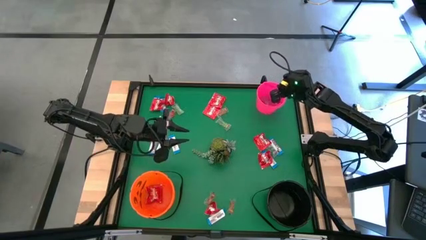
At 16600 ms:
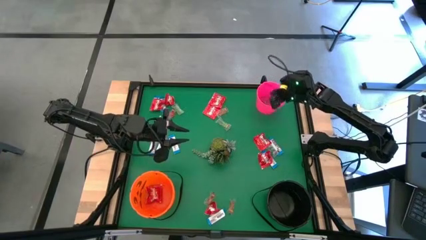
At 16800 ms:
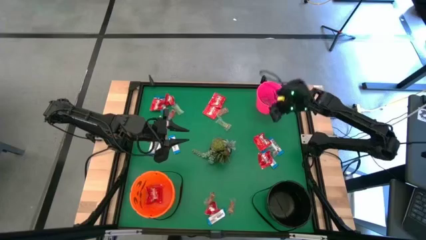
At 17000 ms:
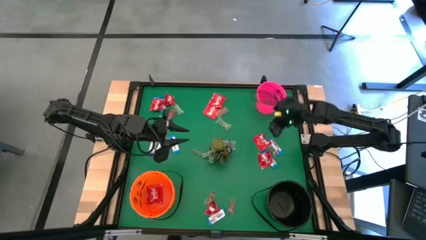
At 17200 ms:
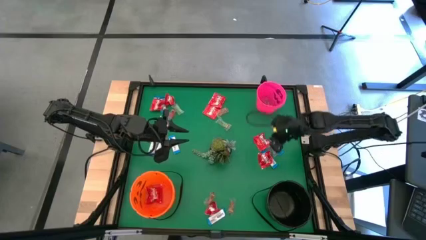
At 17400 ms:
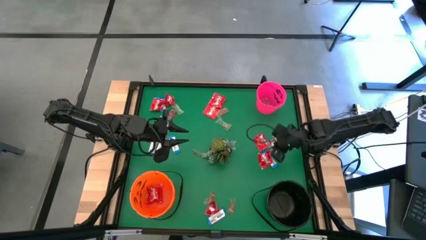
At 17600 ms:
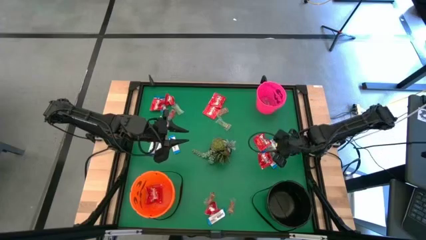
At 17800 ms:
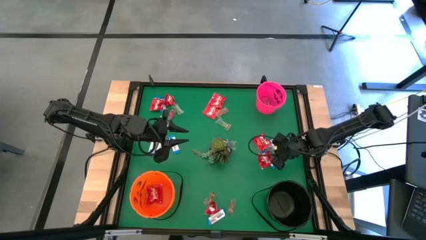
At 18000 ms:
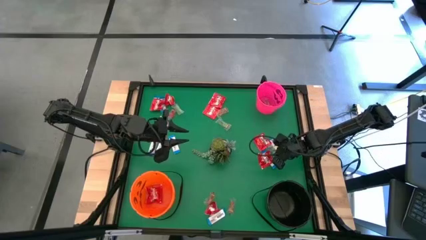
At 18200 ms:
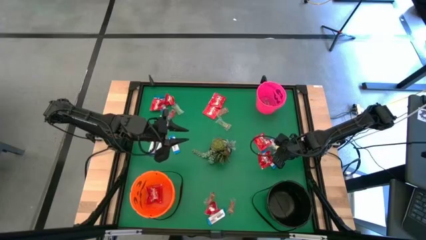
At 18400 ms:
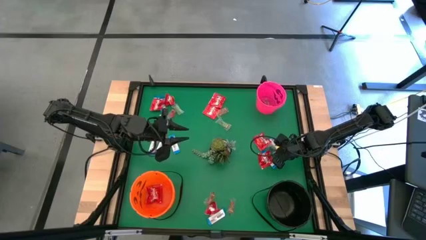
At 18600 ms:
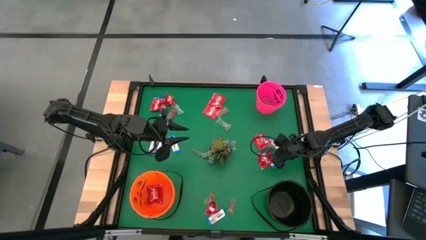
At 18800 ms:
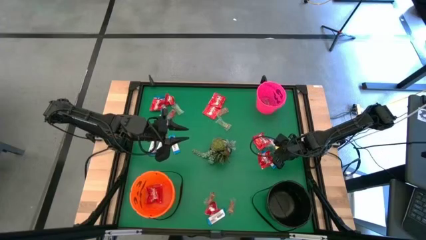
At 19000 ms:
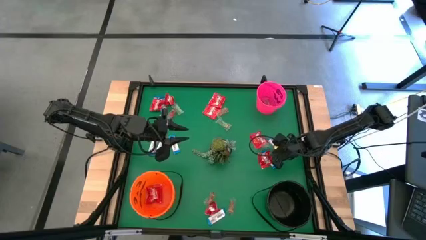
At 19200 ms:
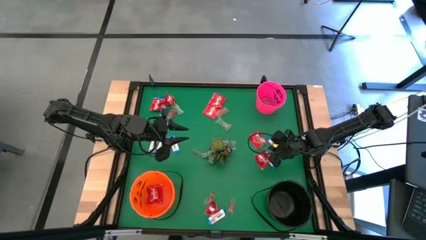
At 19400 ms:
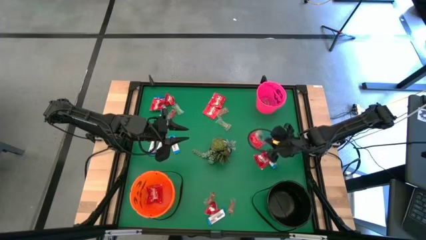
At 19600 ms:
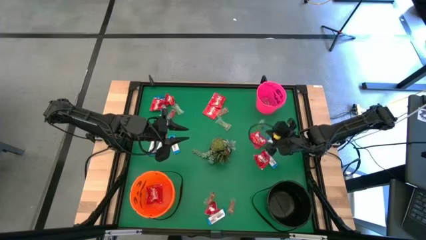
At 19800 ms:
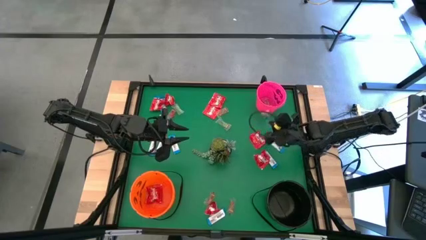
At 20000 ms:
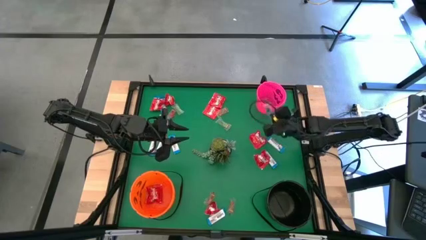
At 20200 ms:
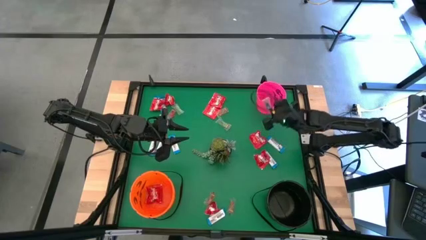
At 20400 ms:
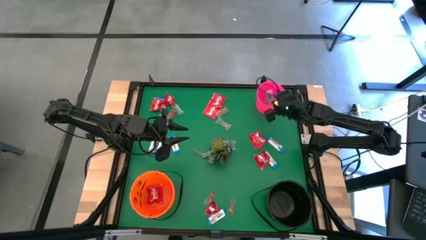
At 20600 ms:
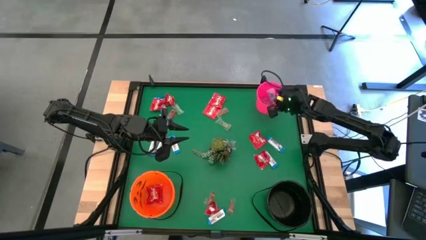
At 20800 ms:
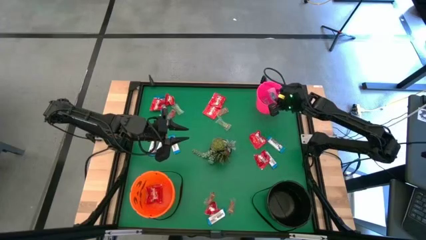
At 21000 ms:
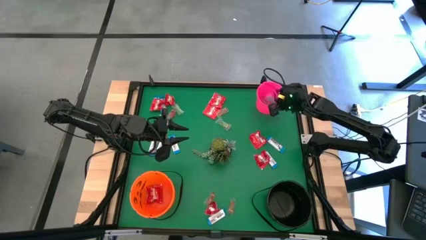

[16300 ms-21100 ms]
Task: Sort candy
Put the blue gummy into the pink bucket

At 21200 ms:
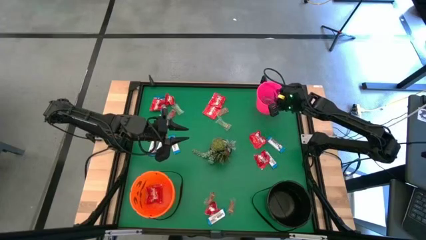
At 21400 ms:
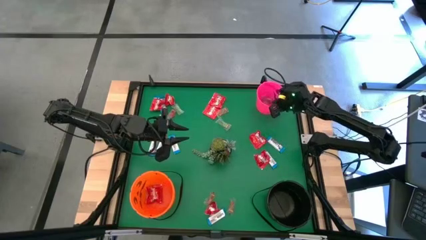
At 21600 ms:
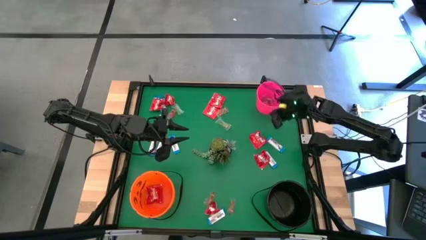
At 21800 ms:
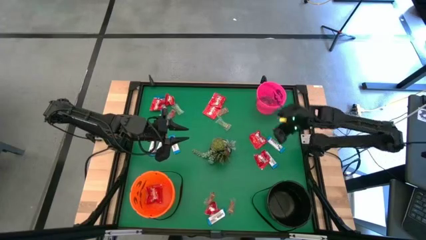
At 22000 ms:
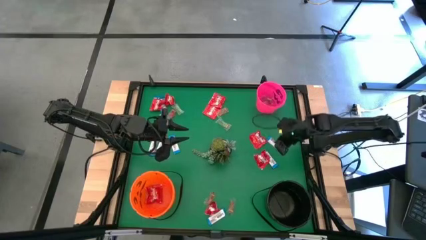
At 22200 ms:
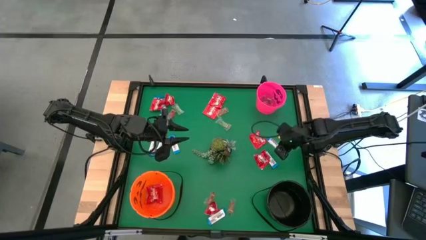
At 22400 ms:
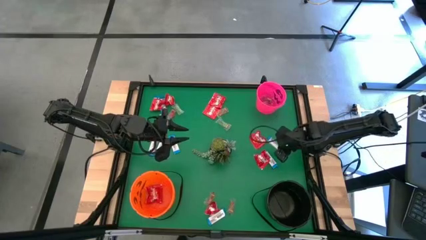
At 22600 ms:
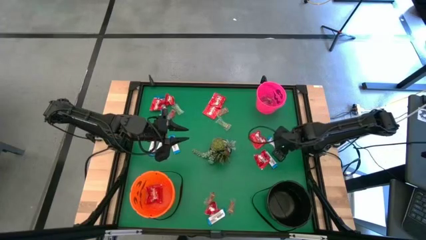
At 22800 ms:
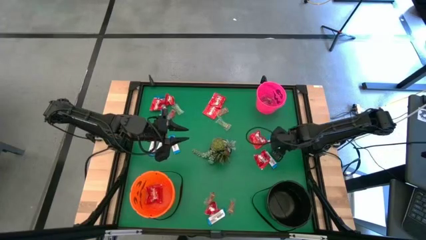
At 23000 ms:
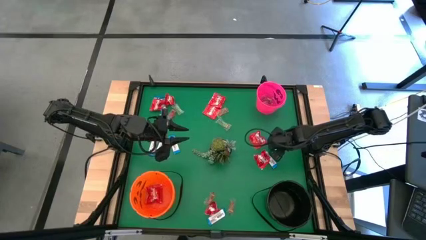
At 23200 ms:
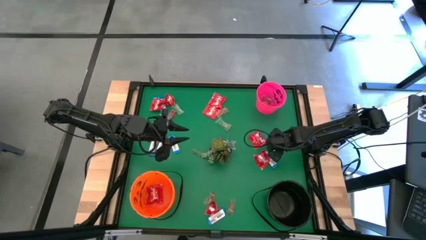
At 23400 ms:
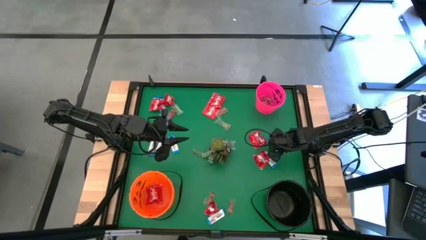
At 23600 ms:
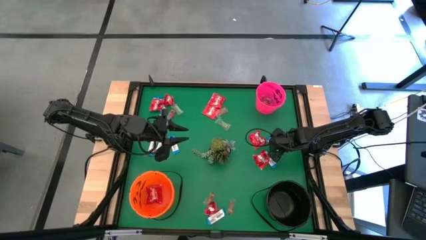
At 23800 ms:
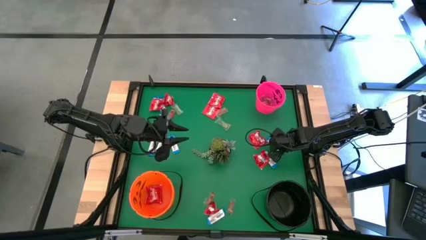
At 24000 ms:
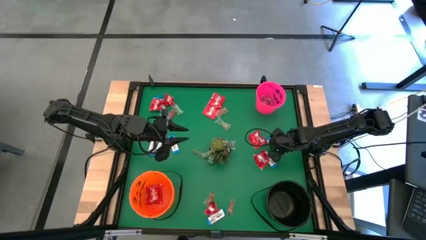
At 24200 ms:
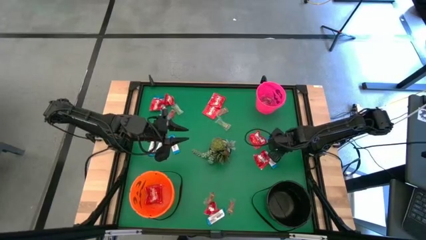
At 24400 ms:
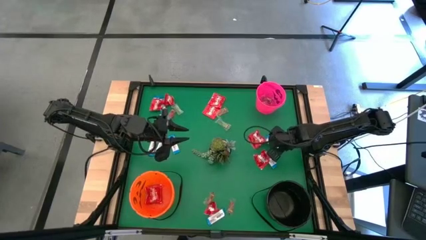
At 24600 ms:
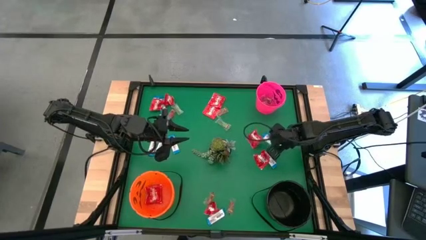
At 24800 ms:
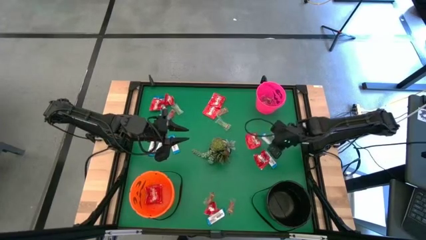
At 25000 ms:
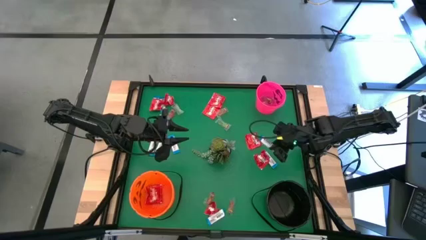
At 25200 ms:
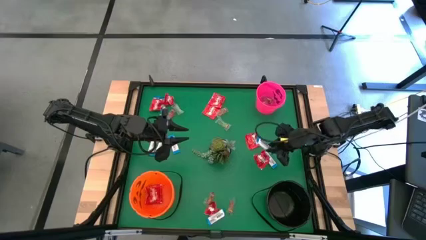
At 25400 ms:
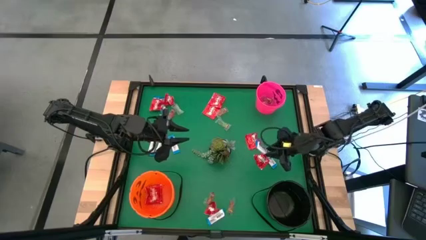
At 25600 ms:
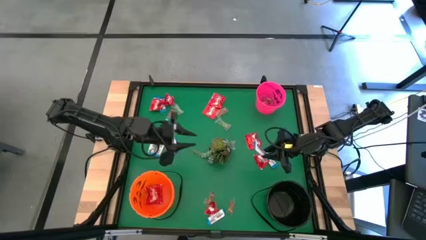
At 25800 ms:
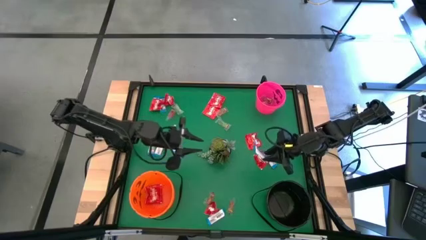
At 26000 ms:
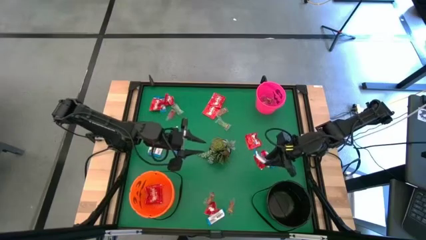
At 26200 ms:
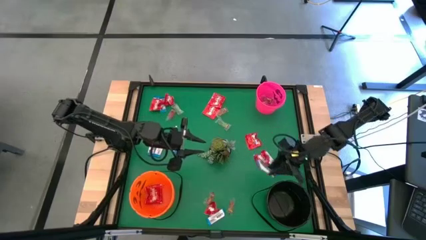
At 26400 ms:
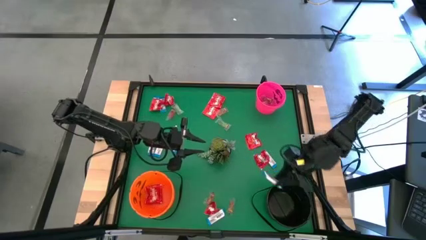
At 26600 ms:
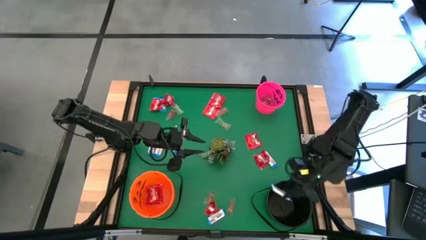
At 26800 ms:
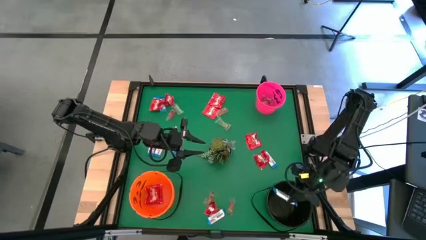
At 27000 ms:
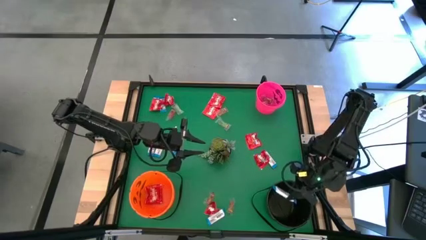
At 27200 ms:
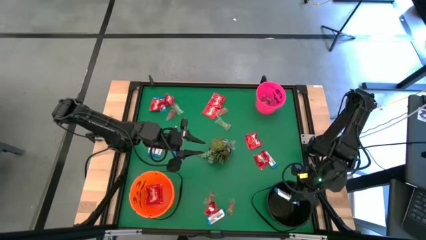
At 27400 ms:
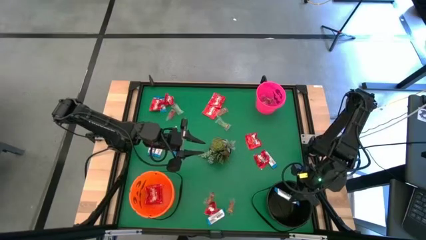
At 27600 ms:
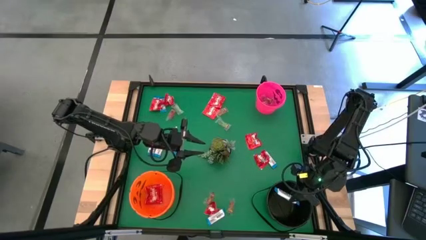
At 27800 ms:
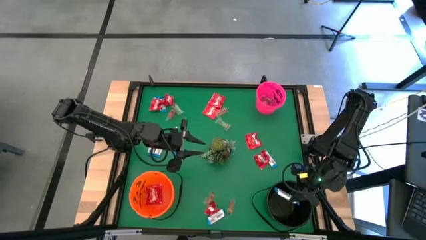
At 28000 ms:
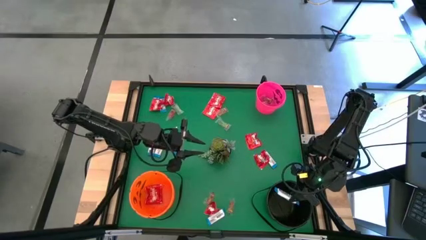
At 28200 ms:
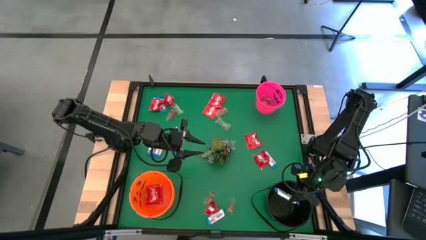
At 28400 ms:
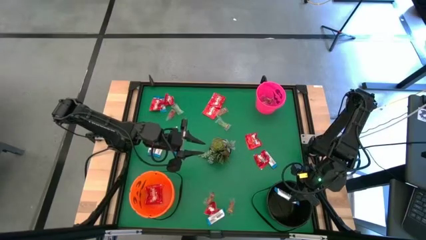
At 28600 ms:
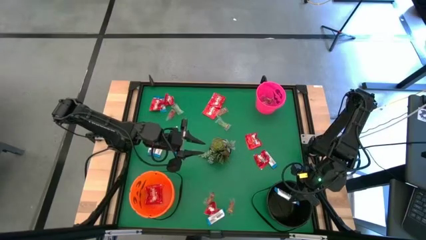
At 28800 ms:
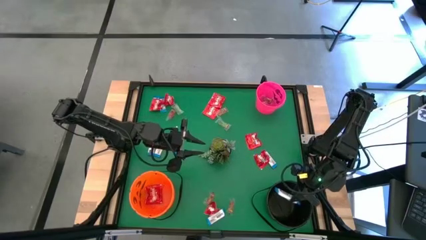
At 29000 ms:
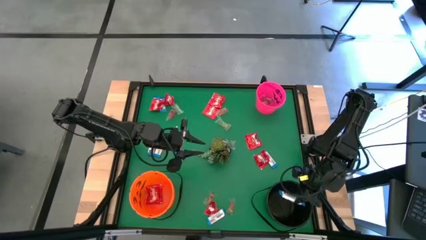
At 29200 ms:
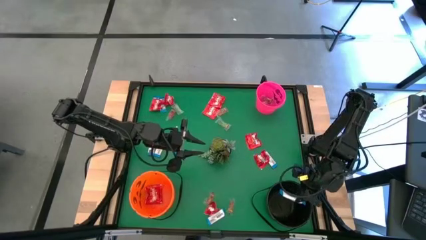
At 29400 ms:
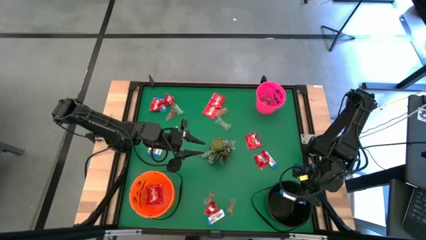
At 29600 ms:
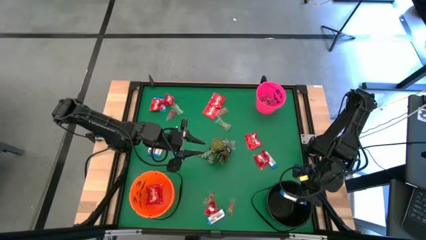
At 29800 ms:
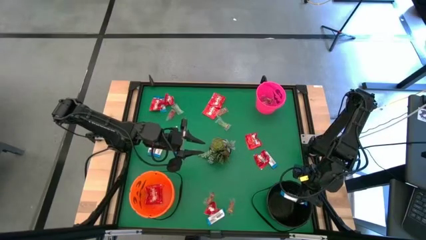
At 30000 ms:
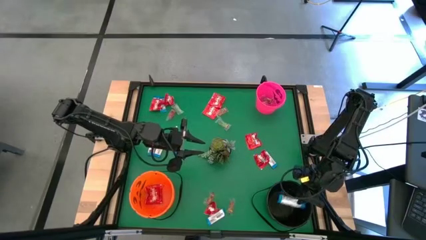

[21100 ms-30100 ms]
Put the white chocolate into the black bucket

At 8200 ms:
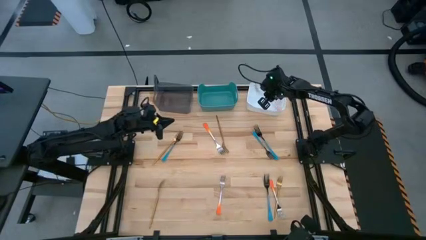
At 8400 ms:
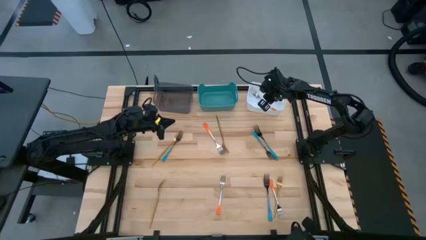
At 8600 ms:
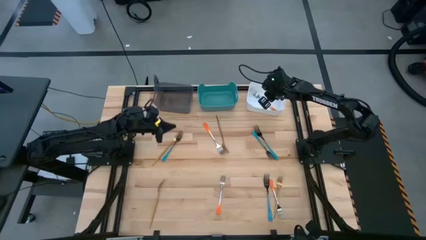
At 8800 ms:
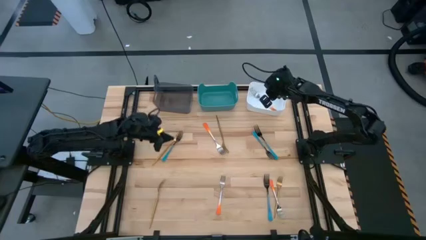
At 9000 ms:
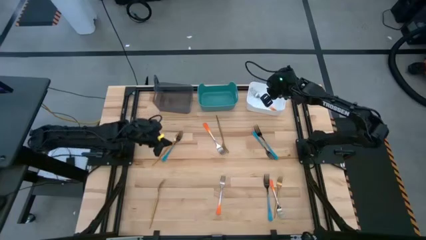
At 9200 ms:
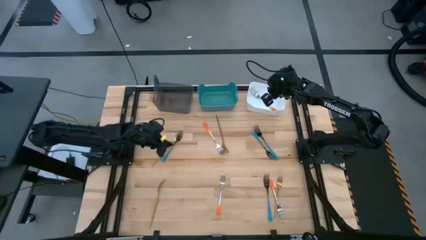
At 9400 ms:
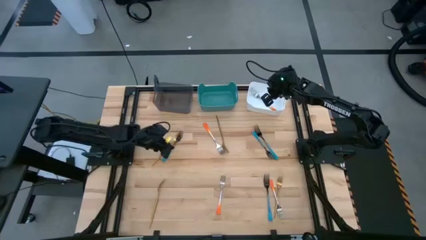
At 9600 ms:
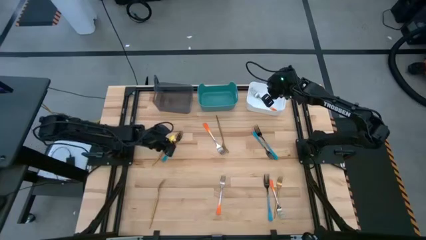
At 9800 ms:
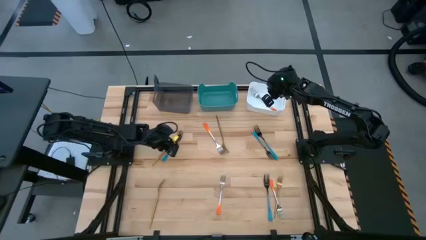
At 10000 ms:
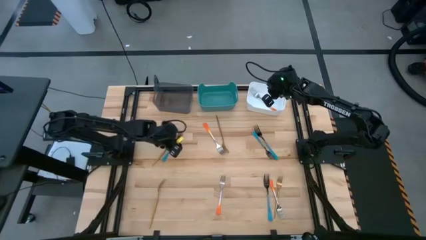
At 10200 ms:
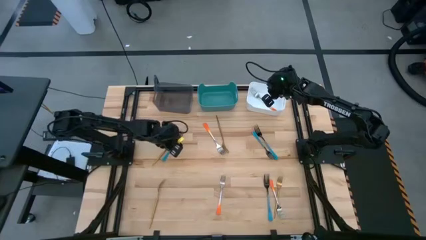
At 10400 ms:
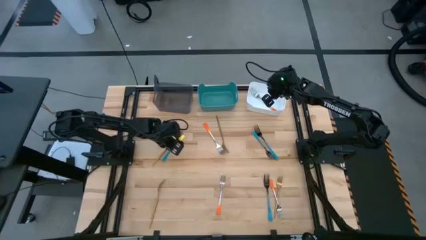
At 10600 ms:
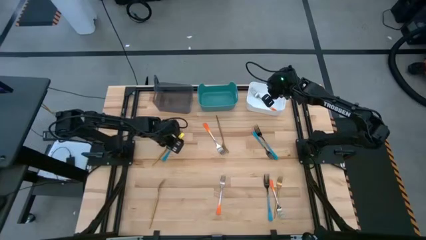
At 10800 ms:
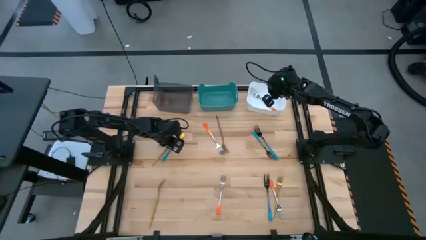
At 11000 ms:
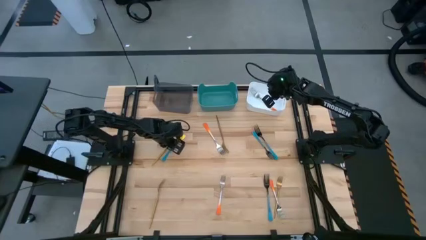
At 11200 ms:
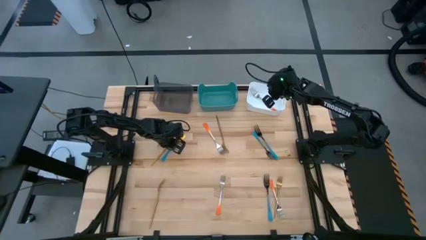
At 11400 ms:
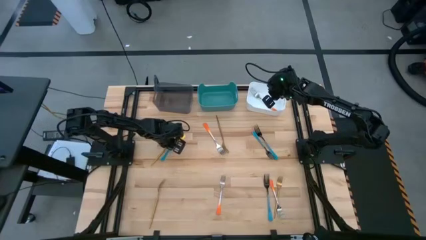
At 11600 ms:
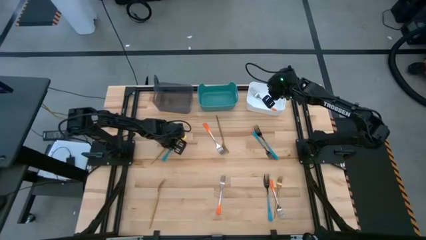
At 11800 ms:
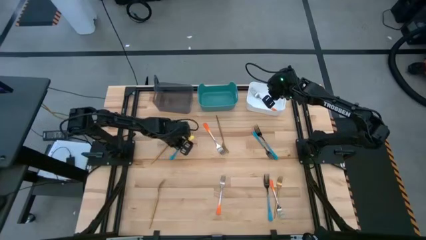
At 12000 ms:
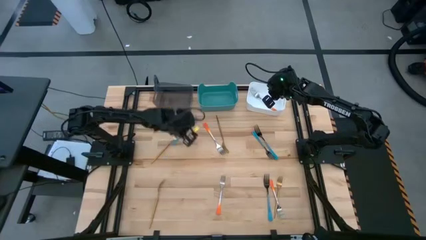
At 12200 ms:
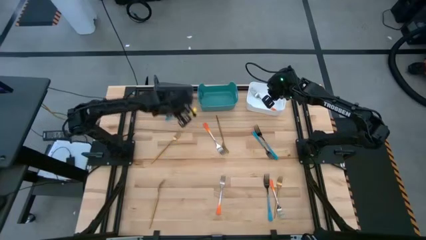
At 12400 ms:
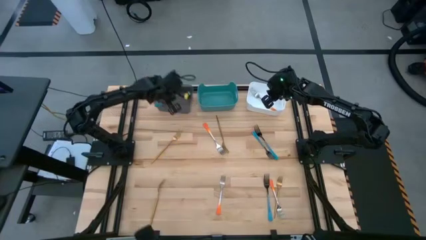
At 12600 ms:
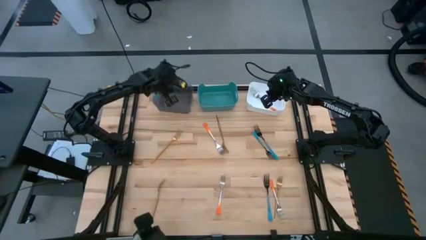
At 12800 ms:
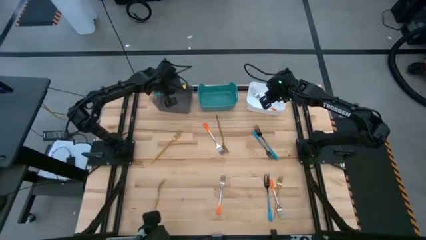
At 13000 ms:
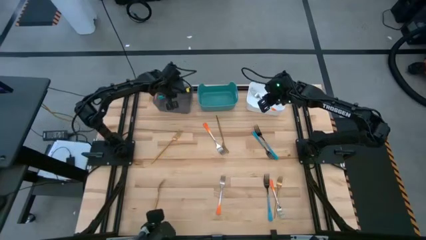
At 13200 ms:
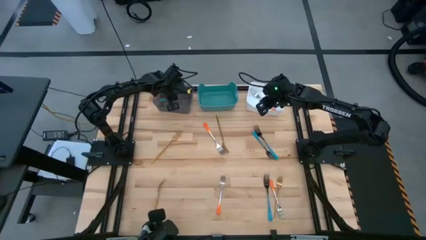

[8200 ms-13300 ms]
Task: Sort silverware by color (type)
Put the blue fork into the black bin
